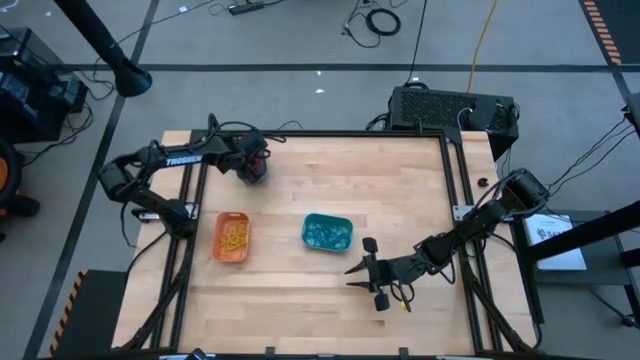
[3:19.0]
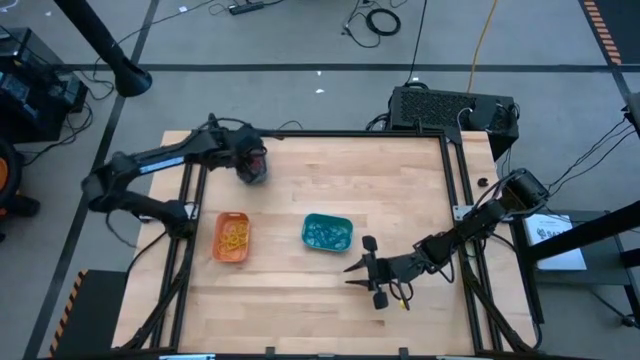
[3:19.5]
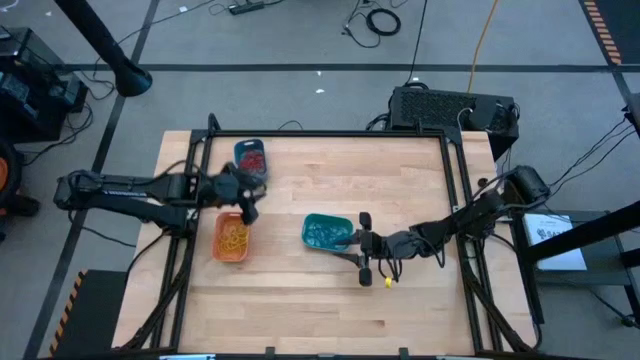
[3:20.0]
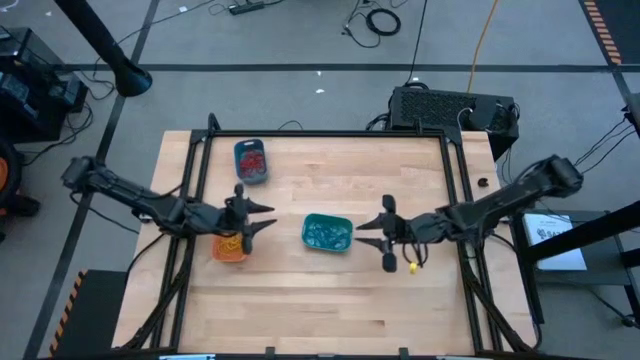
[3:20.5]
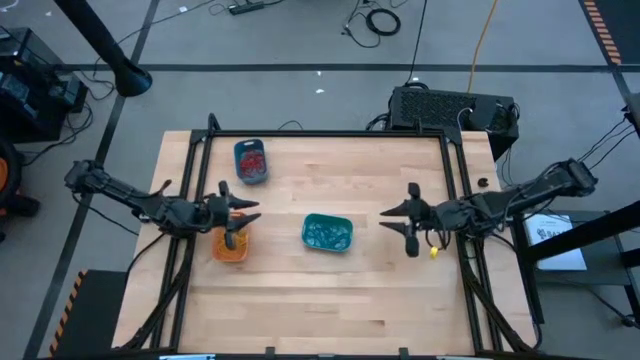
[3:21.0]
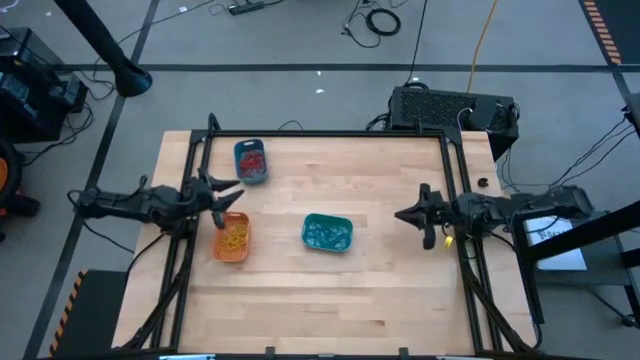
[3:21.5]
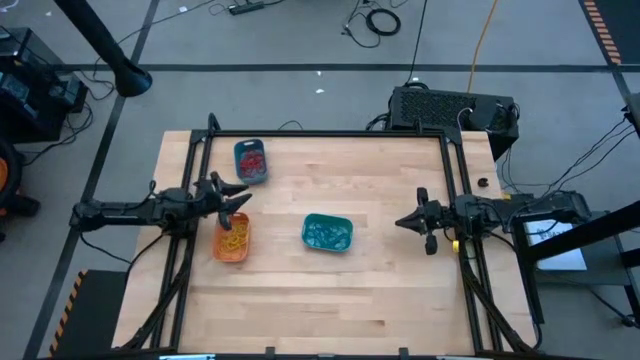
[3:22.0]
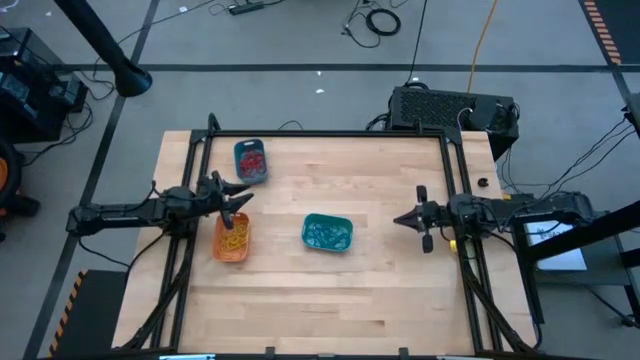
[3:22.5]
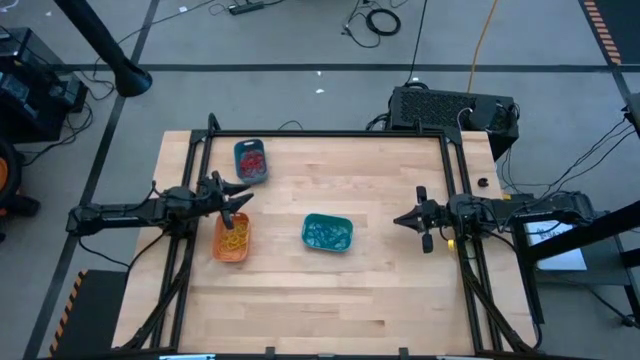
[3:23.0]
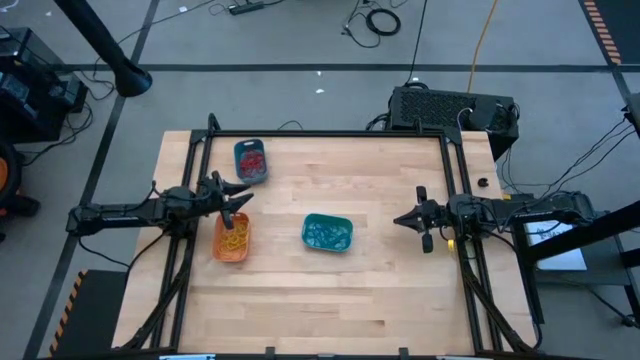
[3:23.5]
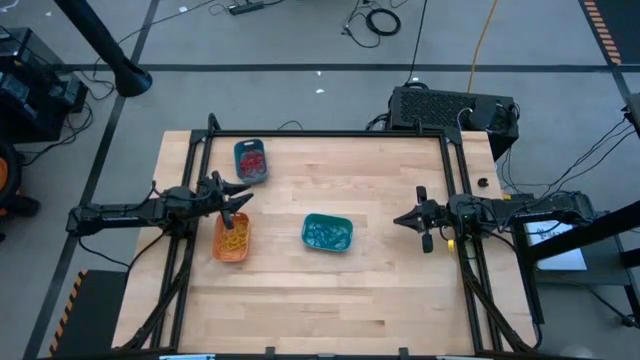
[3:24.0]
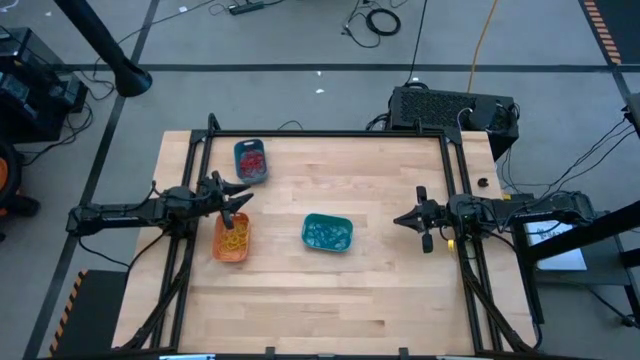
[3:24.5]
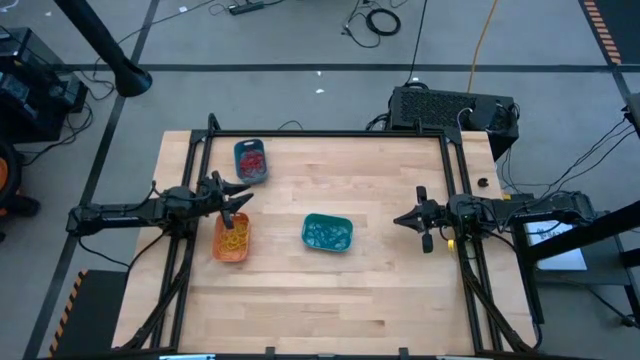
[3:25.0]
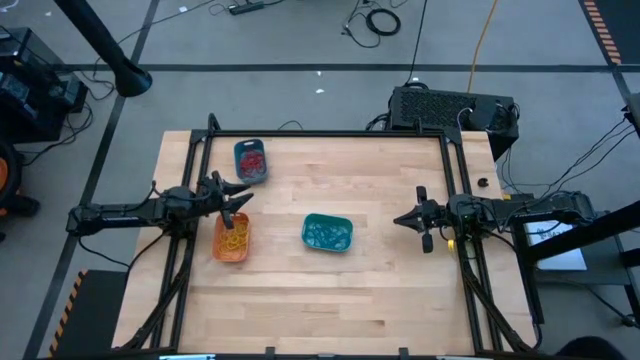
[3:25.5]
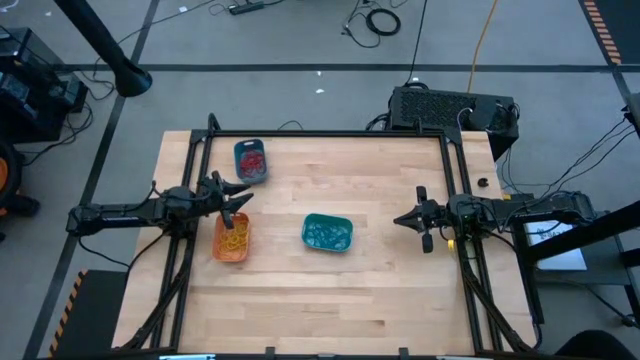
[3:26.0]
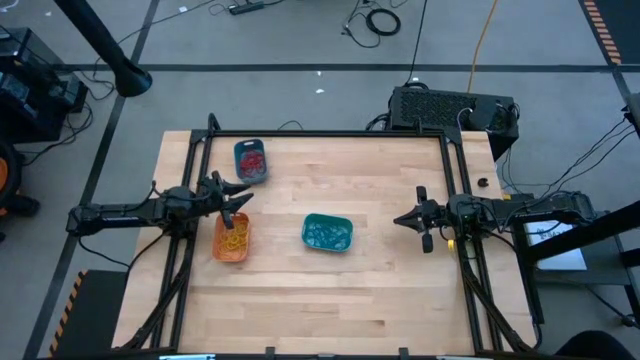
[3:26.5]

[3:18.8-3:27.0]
Task: Sort rubber bands into baskets
Return to Home Position

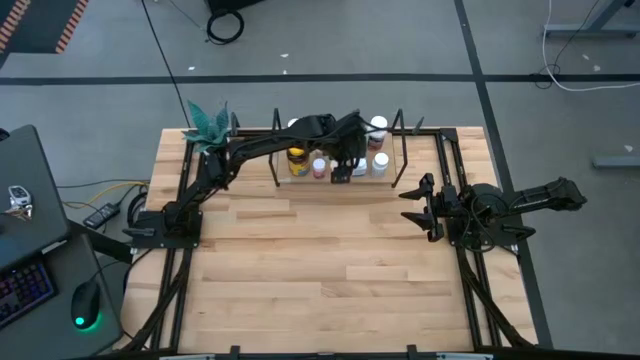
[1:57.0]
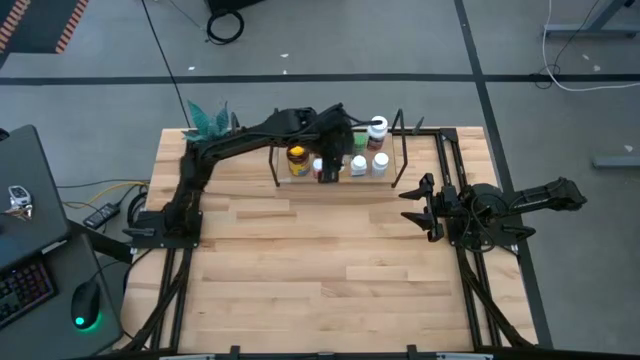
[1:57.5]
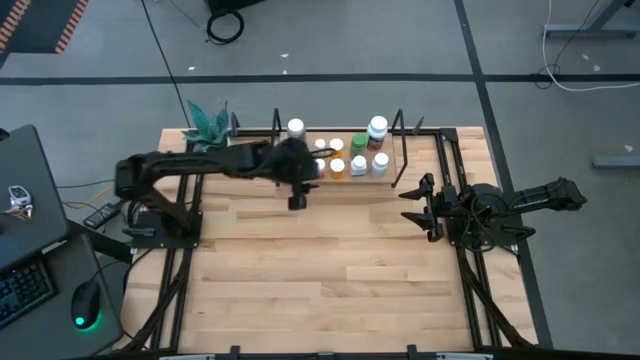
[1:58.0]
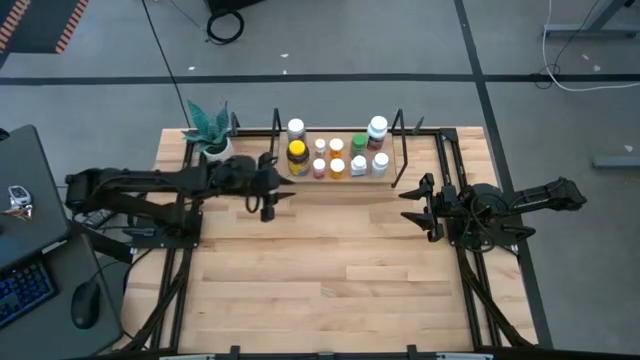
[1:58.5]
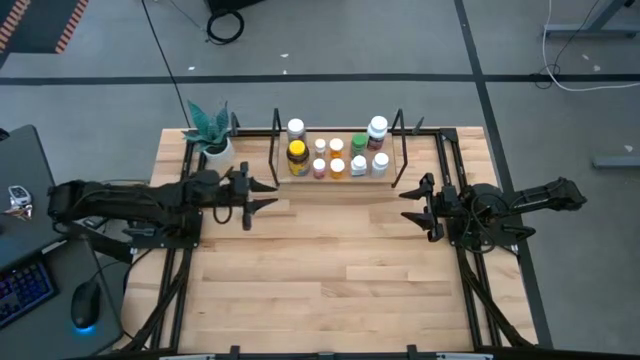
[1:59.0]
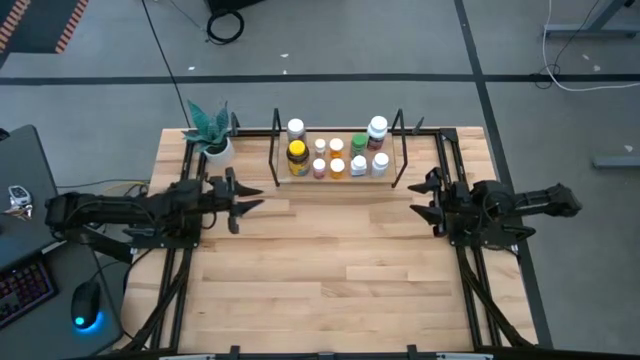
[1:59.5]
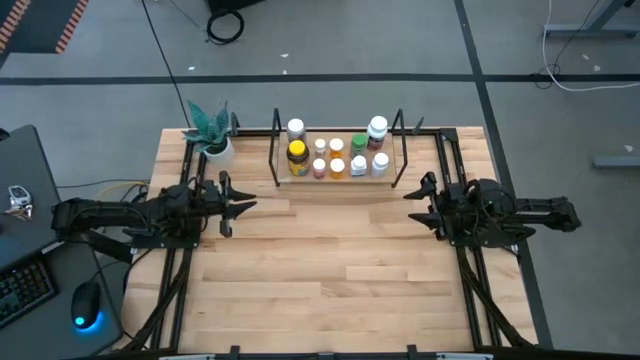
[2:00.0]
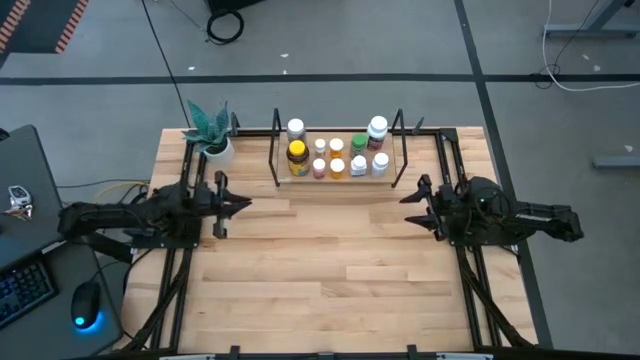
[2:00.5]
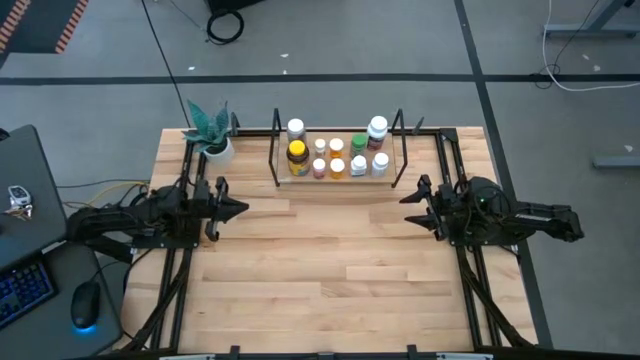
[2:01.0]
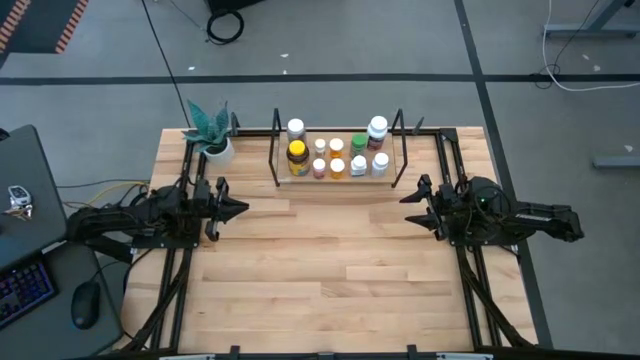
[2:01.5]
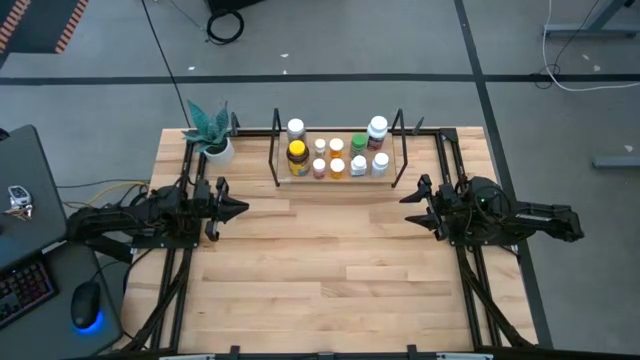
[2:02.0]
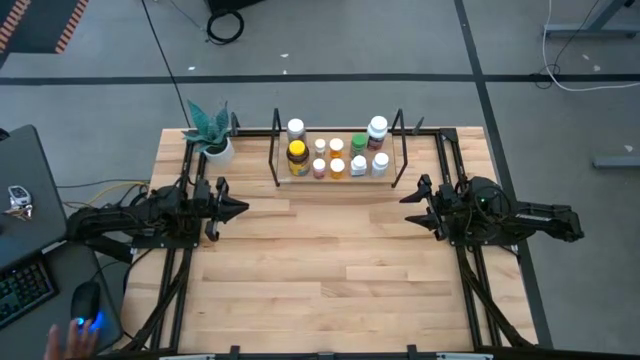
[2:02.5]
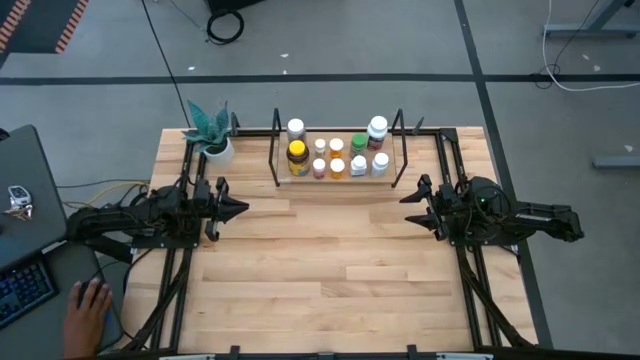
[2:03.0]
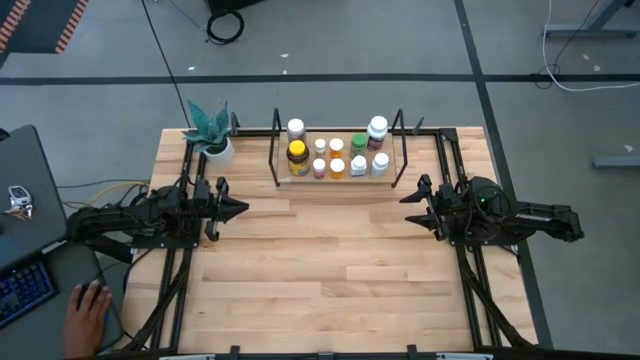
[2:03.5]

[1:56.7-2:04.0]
Task: Pick and place medicine bottles onto shelf by color
Return to Home Position

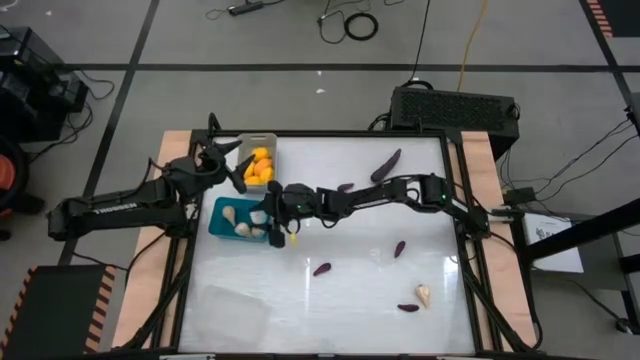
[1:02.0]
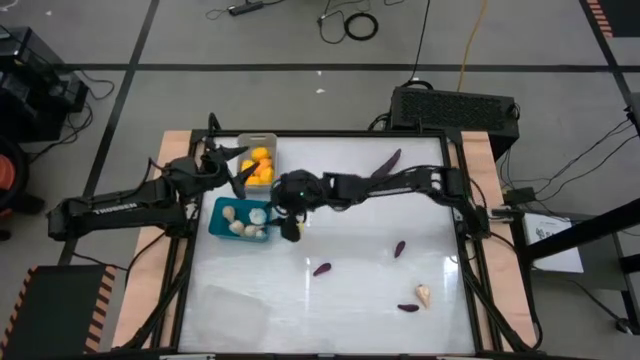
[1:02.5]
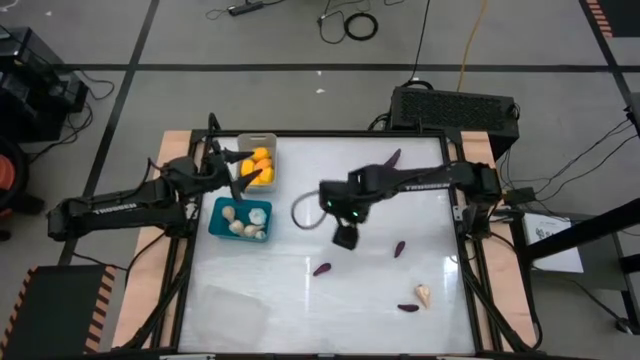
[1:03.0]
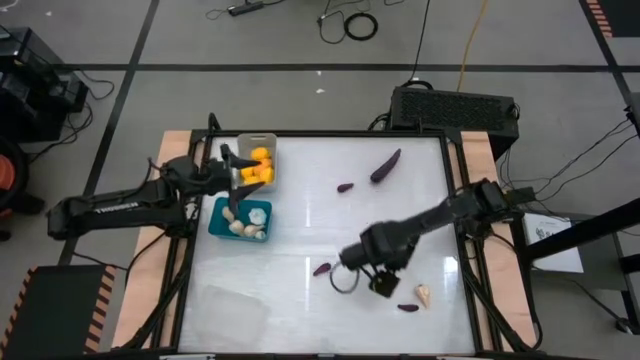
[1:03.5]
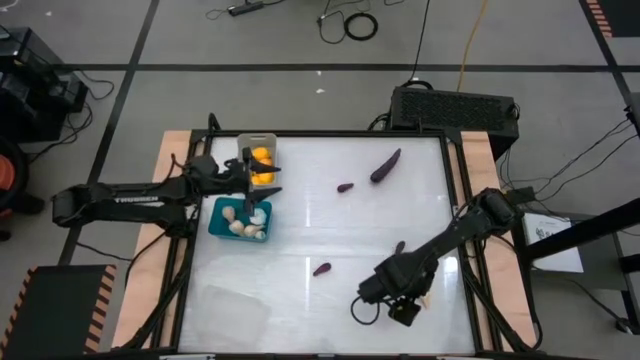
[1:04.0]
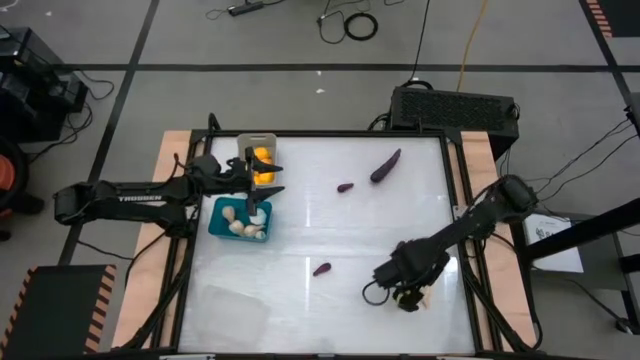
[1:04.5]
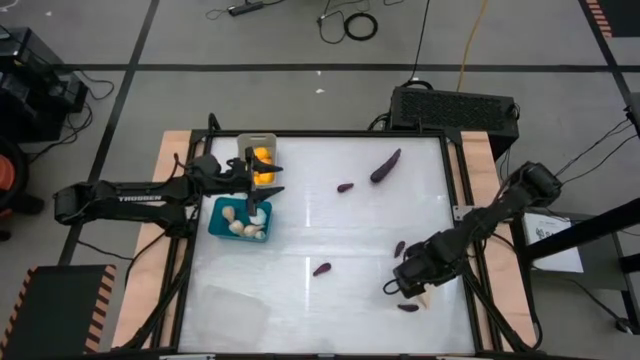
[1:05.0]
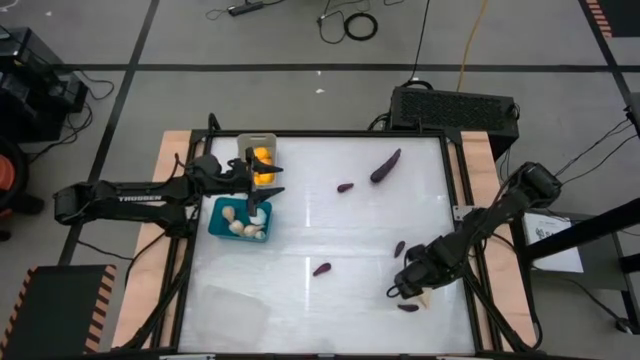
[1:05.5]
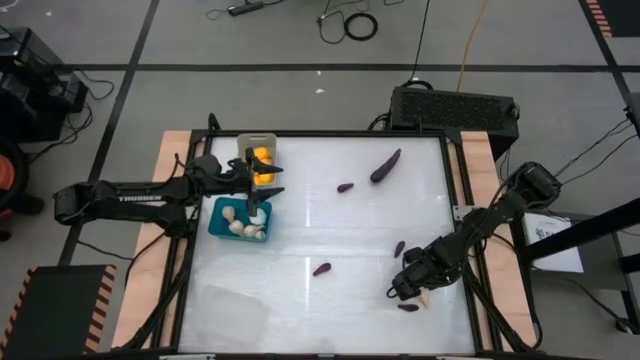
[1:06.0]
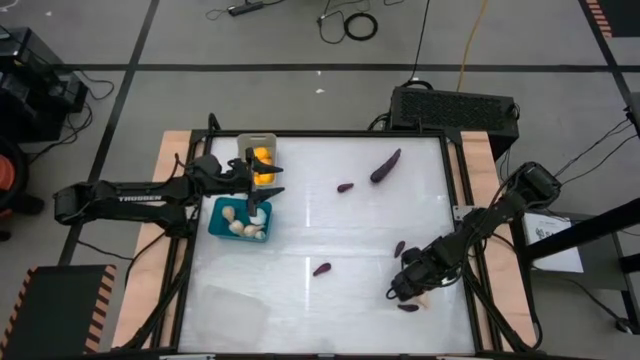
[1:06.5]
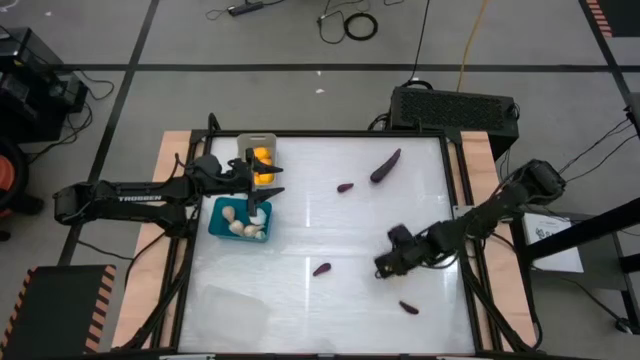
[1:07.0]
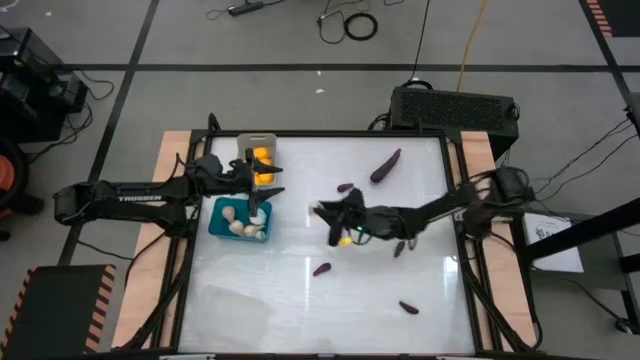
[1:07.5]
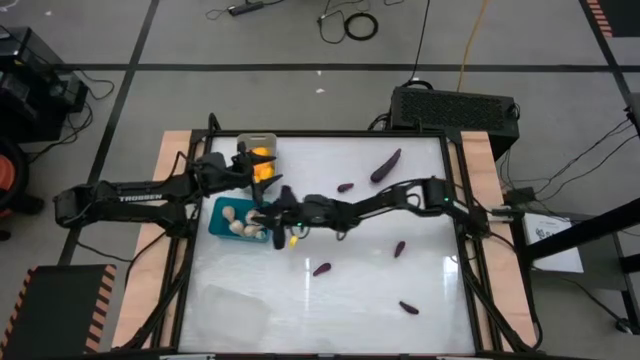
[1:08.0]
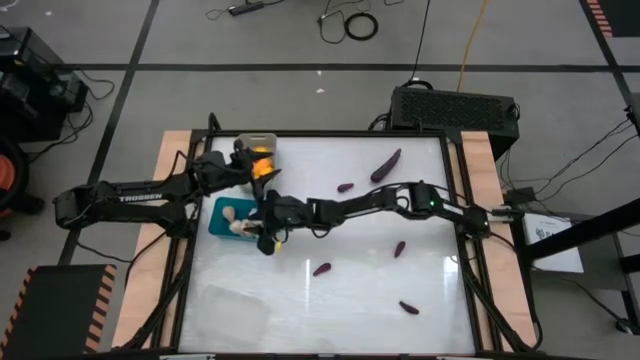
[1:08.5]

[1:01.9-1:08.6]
Task: Sort produce into baskets
Put the white garlic into the blue bin
